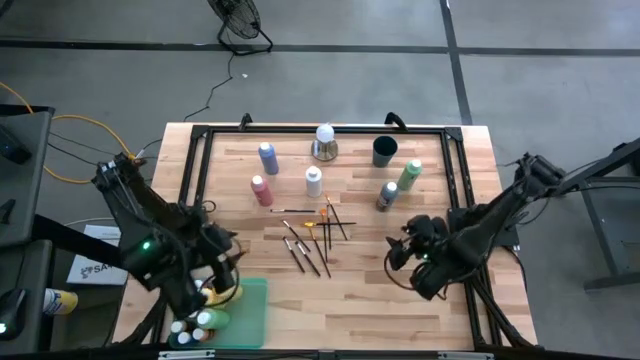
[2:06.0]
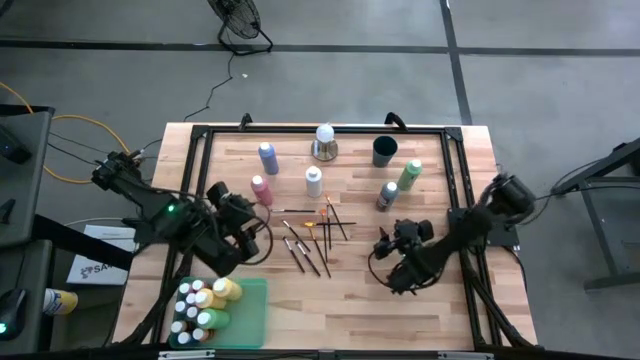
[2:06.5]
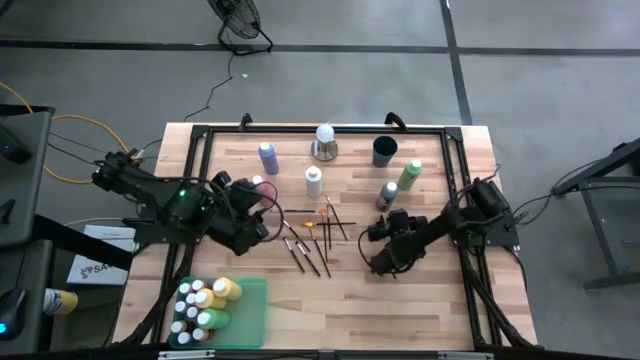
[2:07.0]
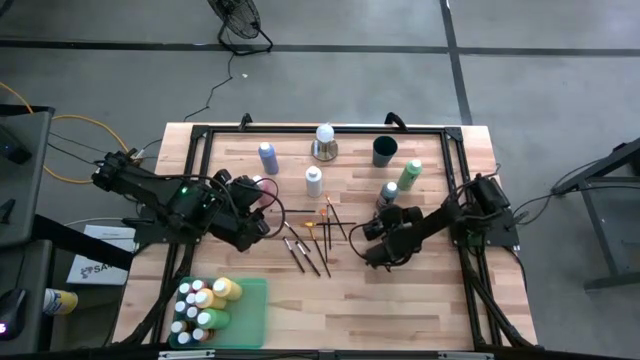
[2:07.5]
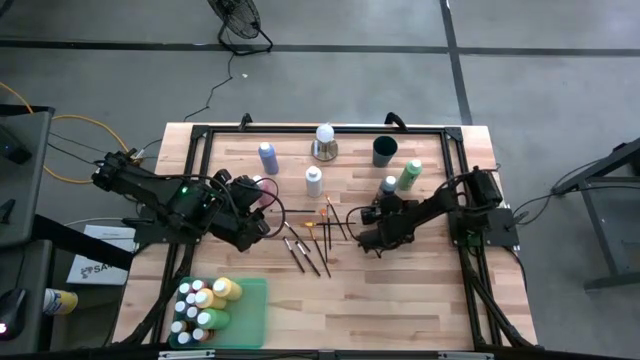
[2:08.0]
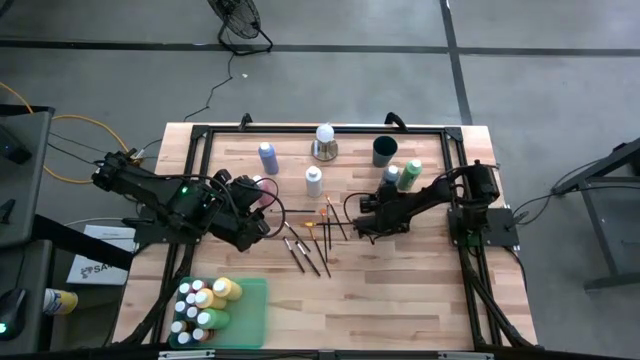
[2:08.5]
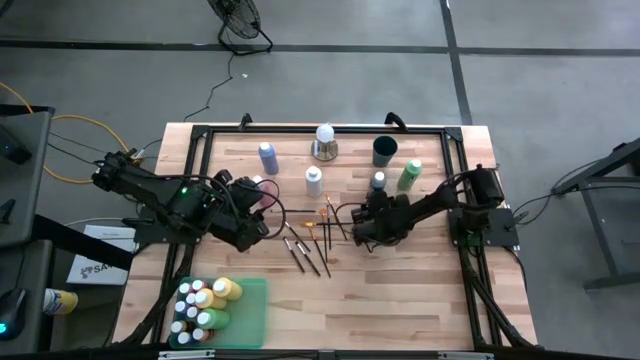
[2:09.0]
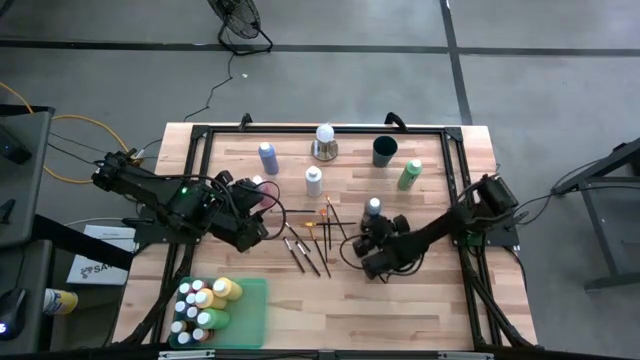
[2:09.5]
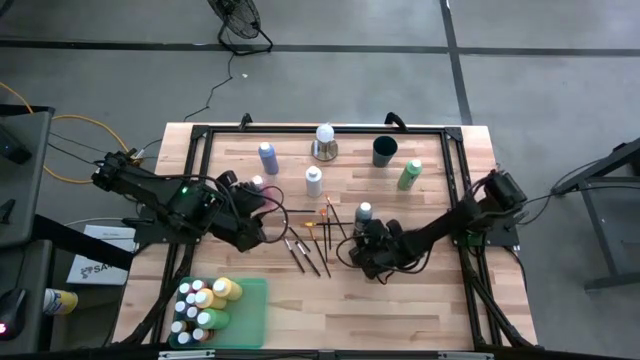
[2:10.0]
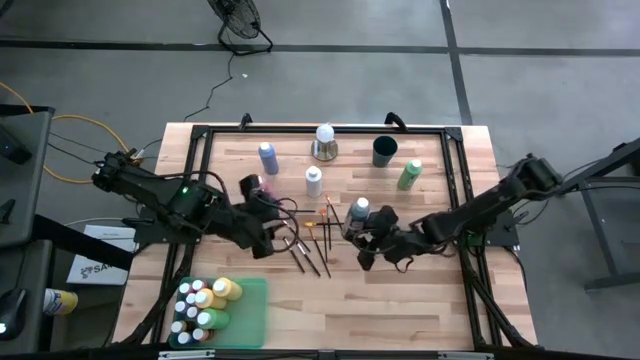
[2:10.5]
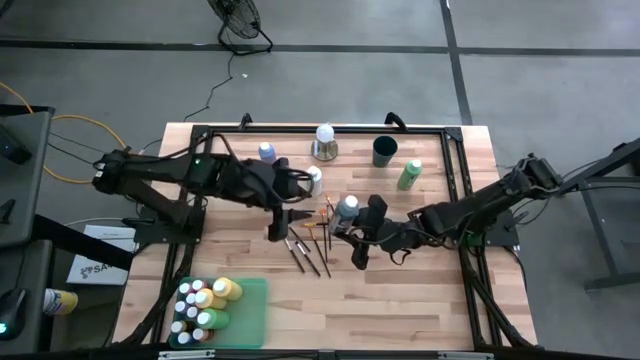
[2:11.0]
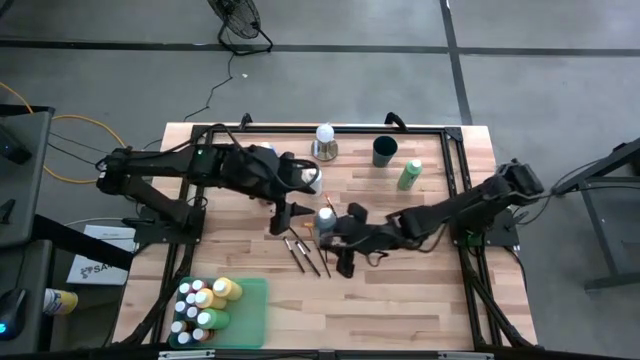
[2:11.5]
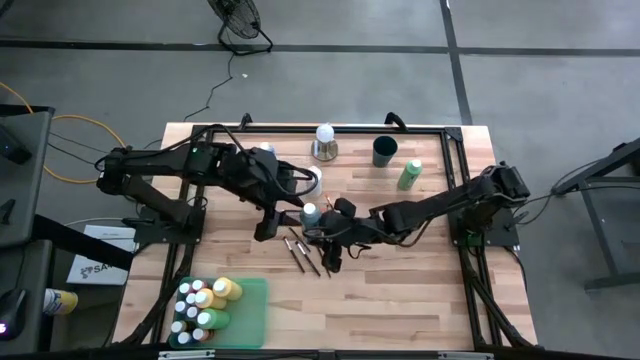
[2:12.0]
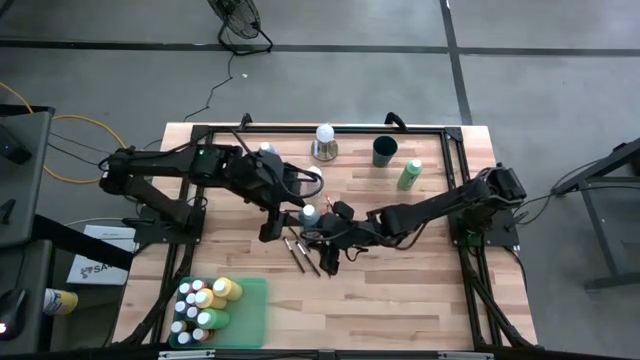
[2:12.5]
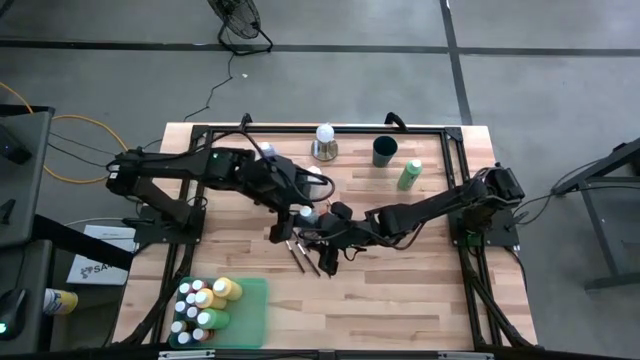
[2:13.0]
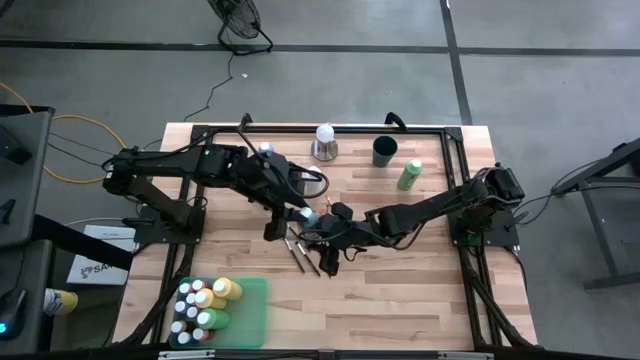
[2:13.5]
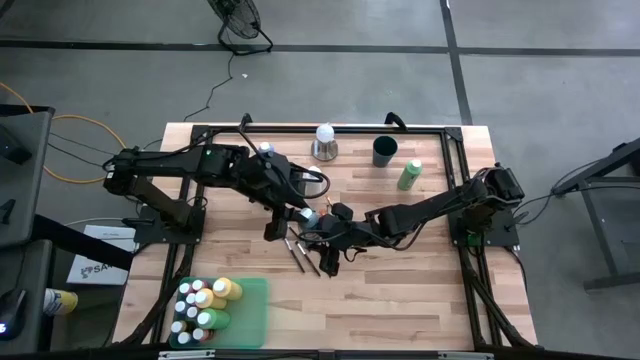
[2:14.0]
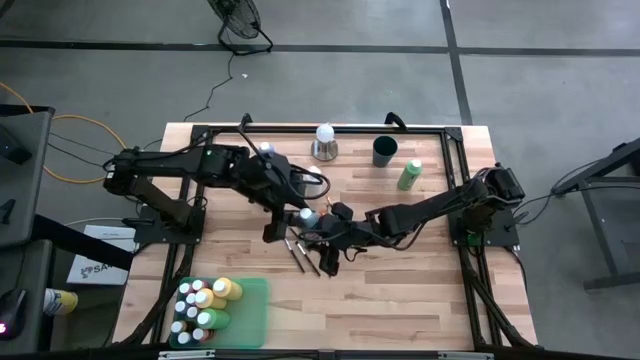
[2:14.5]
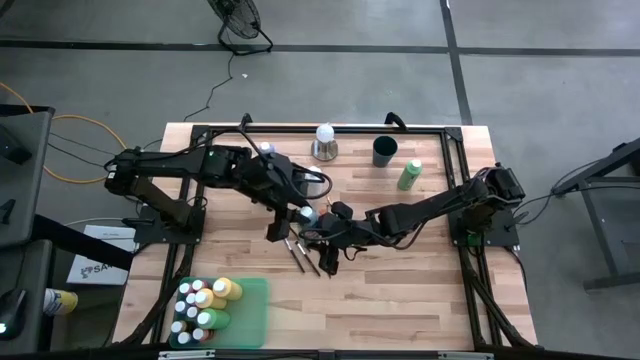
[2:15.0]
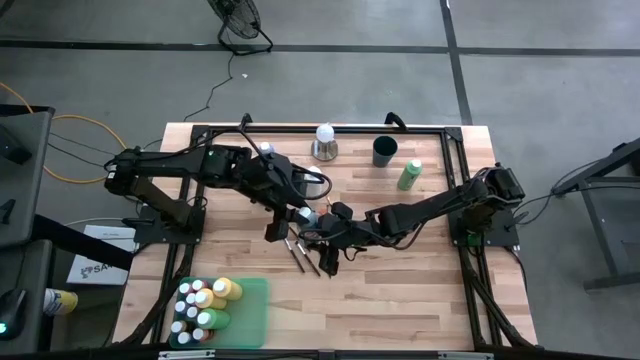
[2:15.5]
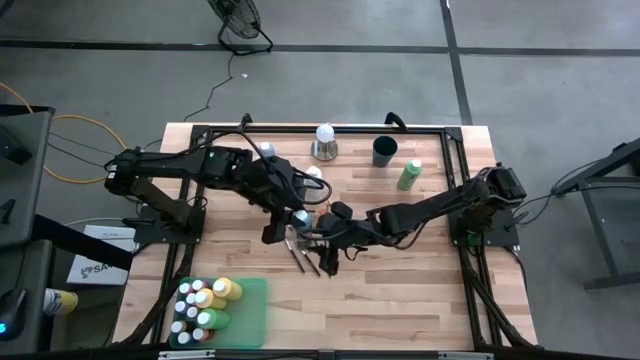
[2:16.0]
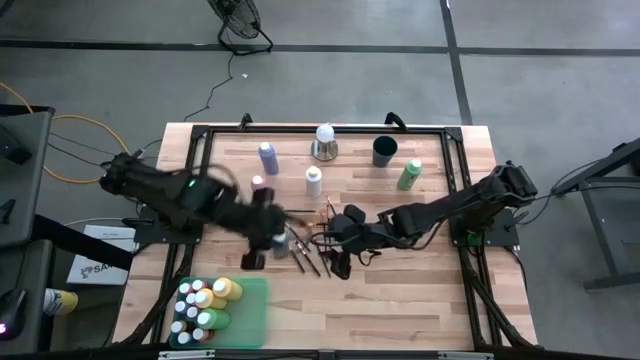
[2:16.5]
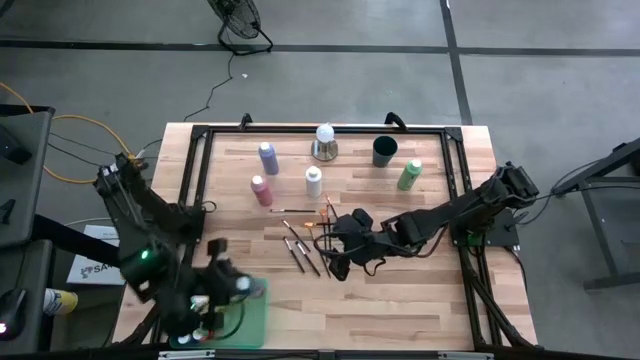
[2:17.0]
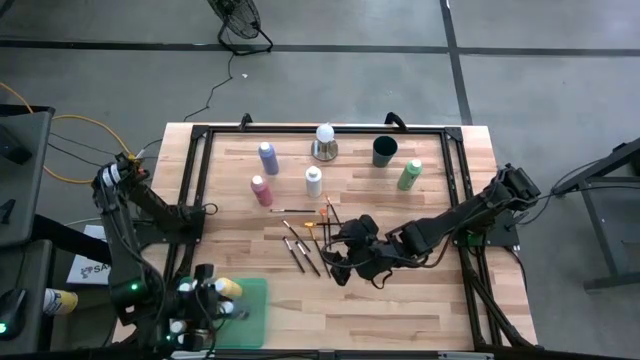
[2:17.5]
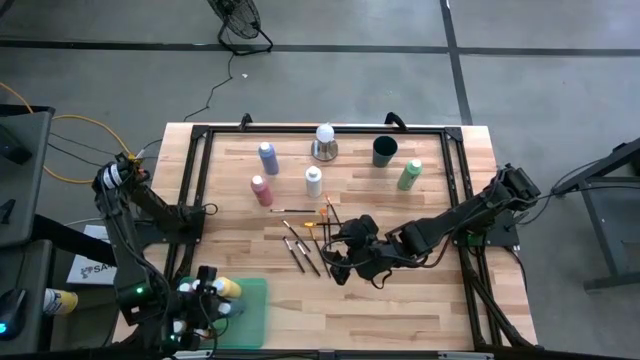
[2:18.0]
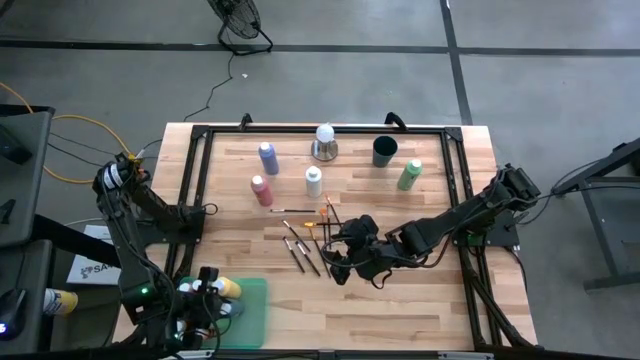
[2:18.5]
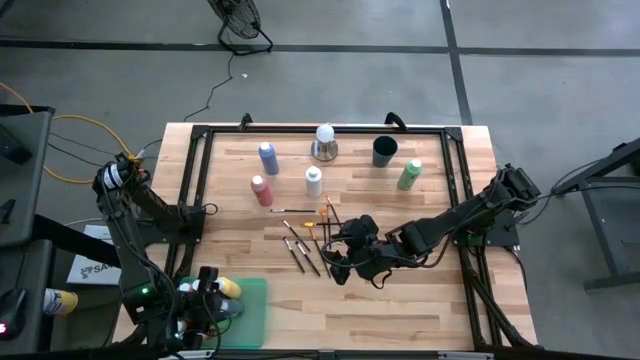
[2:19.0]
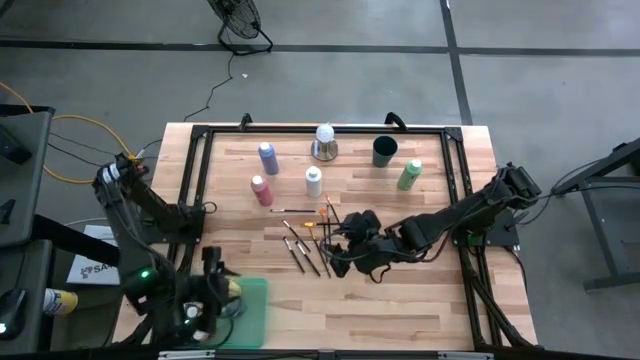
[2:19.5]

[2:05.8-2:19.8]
Task: Pick & Place Paint Supplies
Put the green paint bottle into the green bin

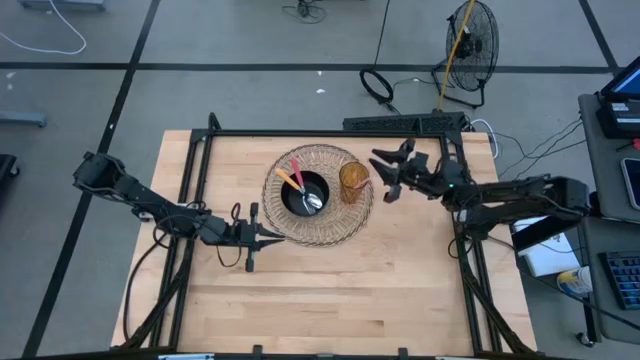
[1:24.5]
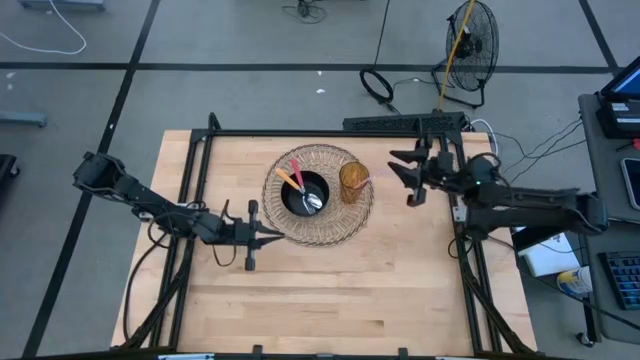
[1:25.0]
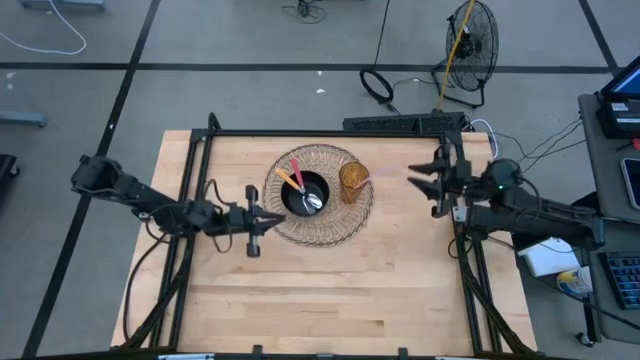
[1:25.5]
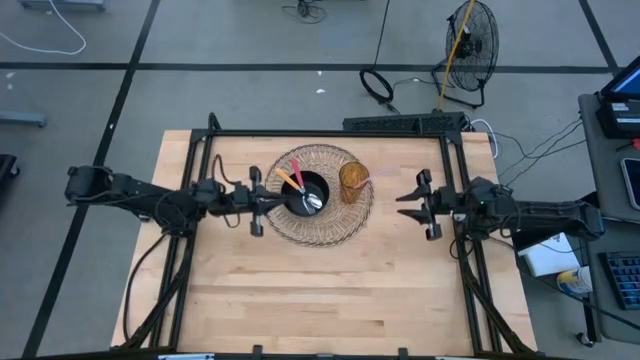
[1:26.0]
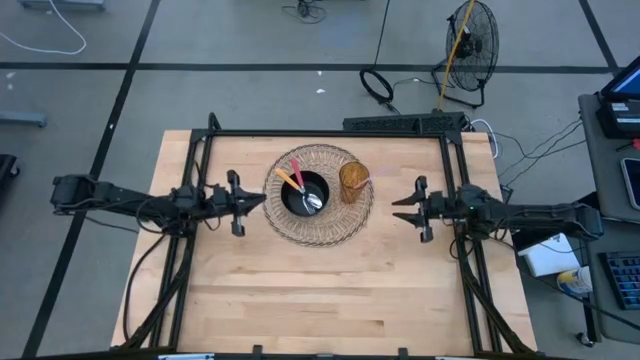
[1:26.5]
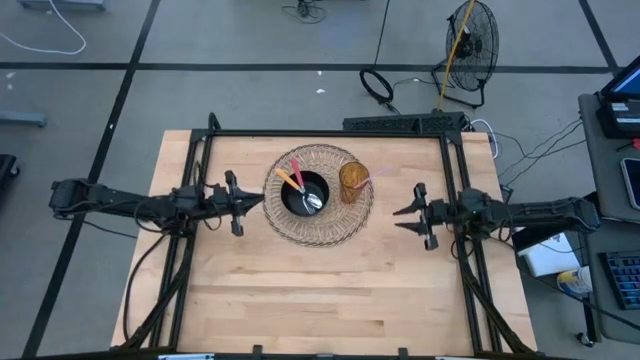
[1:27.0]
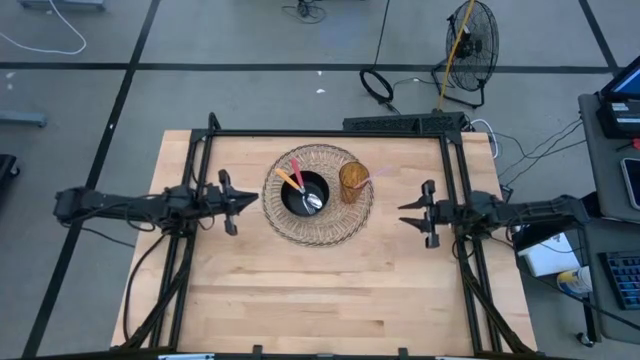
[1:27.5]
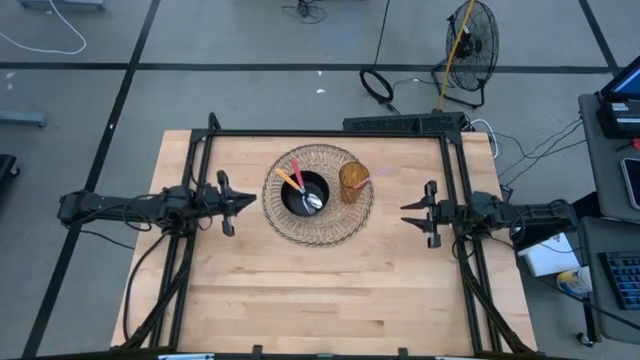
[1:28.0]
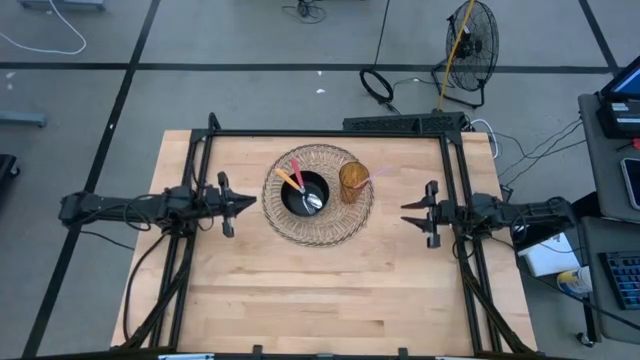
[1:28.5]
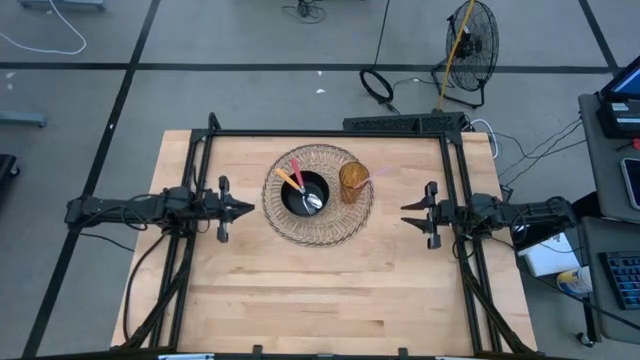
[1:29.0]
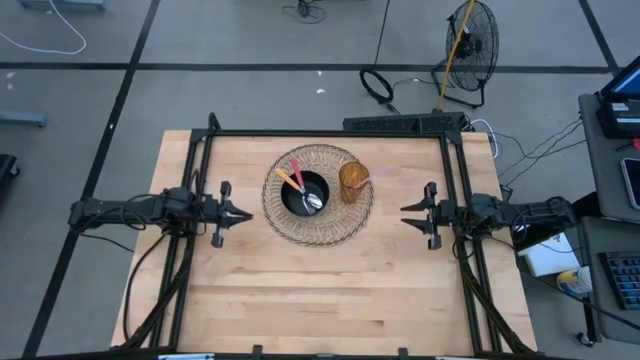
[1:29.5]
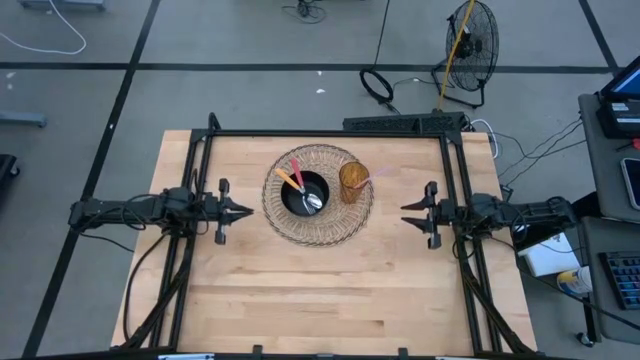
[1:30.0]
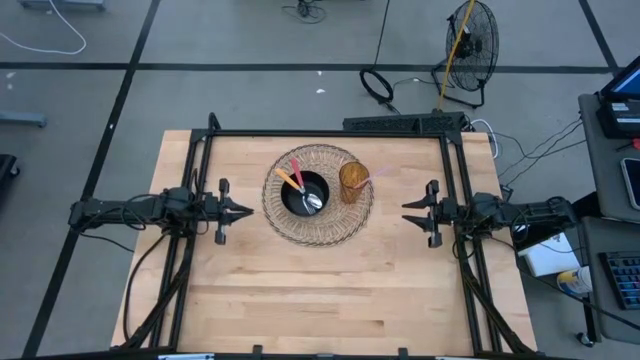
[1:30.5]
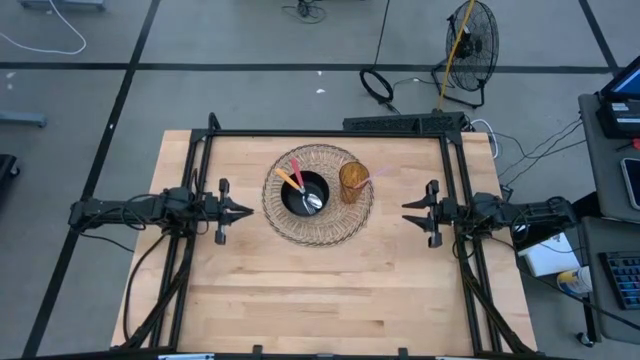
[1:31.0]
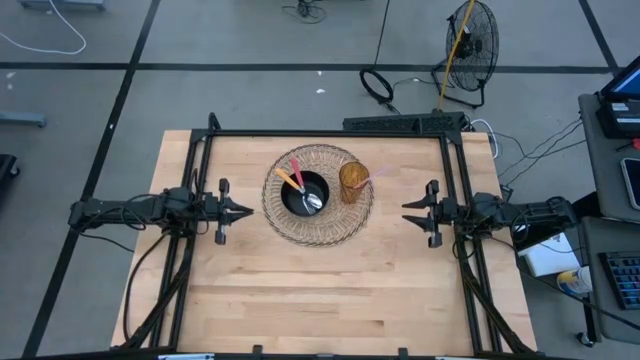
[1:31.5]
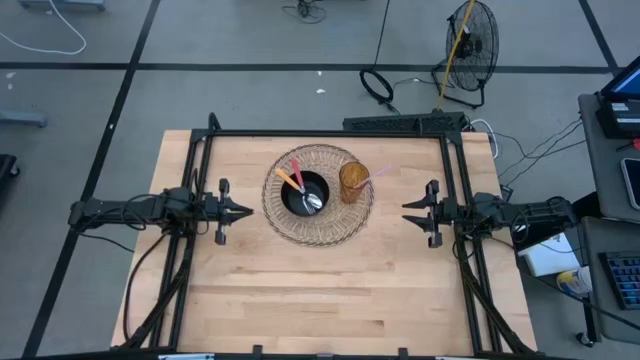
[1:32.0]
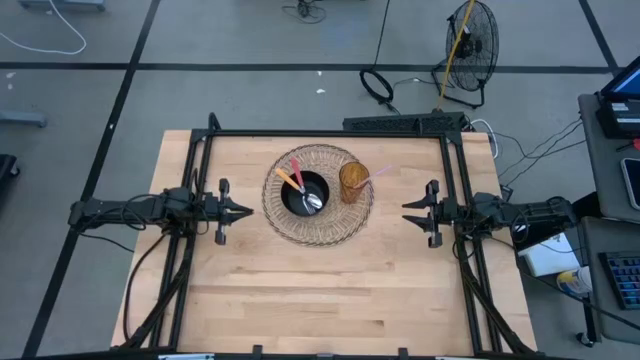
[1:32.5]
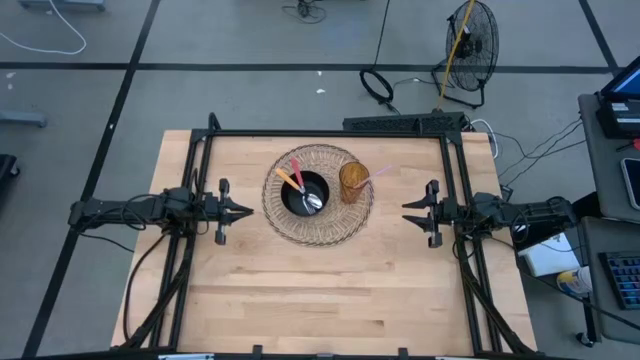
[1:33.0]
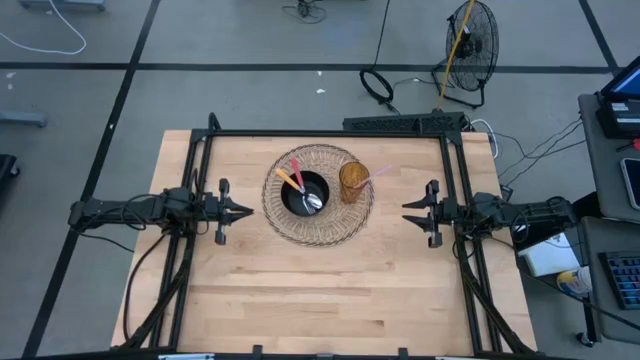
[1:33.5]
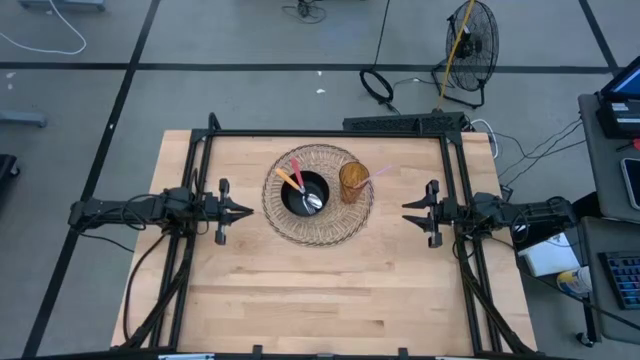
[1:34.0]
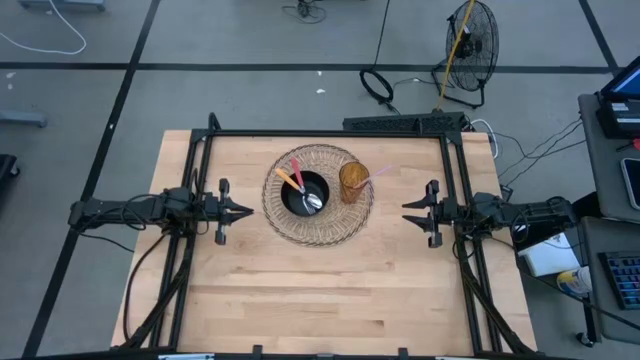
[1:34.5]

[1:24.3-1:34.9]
Task: Pick & Place Utensil
Return to Home Position
